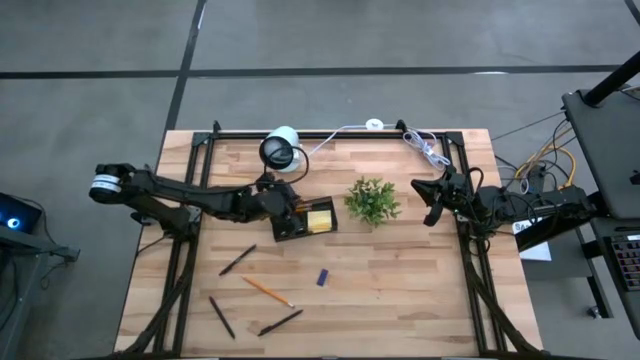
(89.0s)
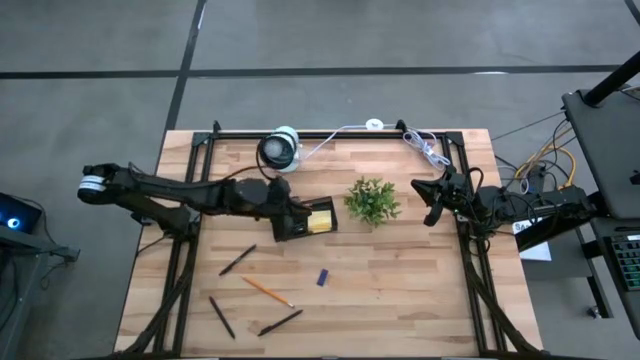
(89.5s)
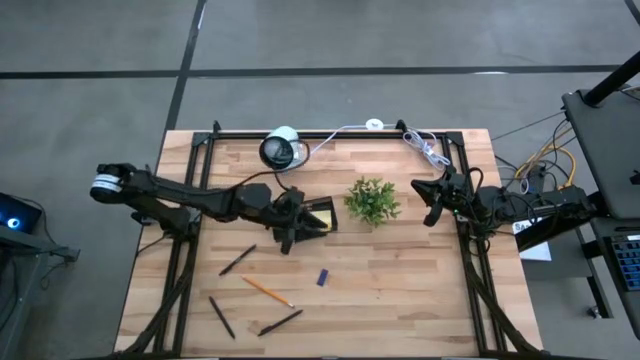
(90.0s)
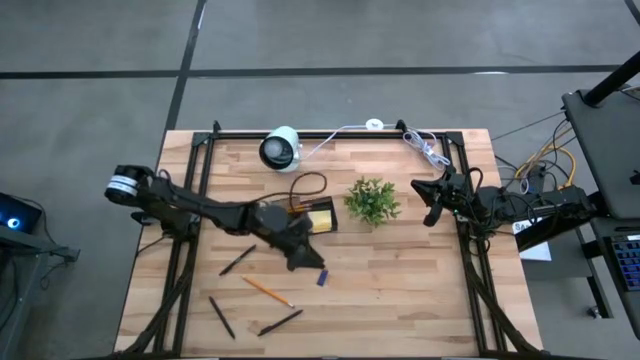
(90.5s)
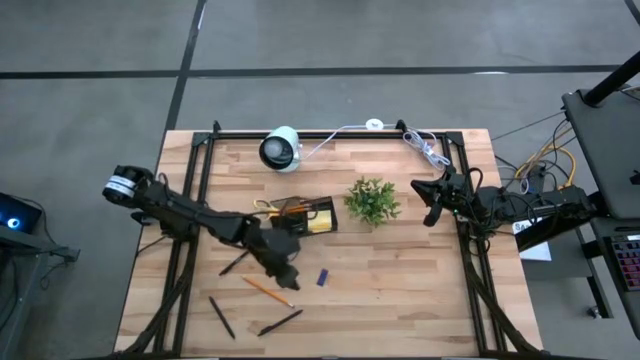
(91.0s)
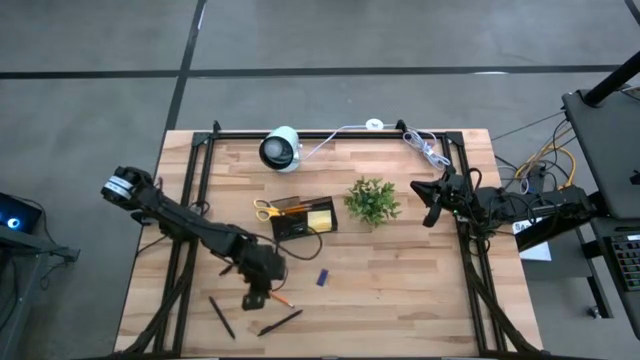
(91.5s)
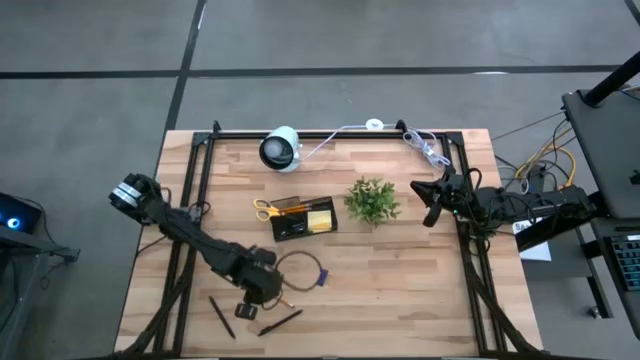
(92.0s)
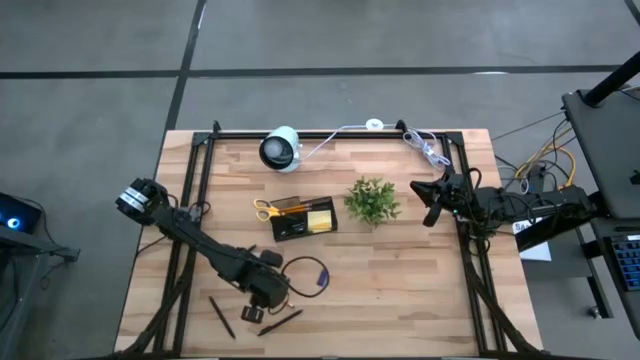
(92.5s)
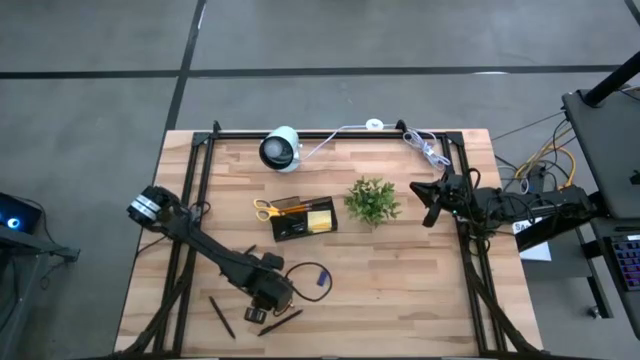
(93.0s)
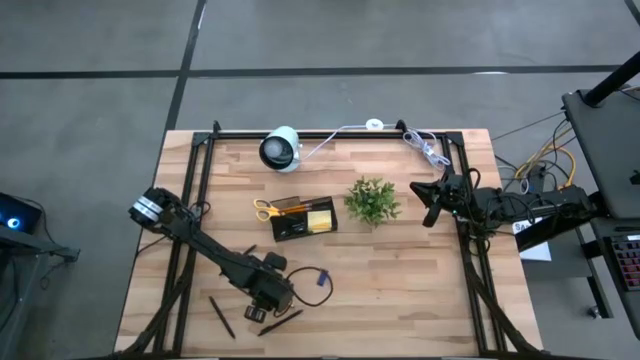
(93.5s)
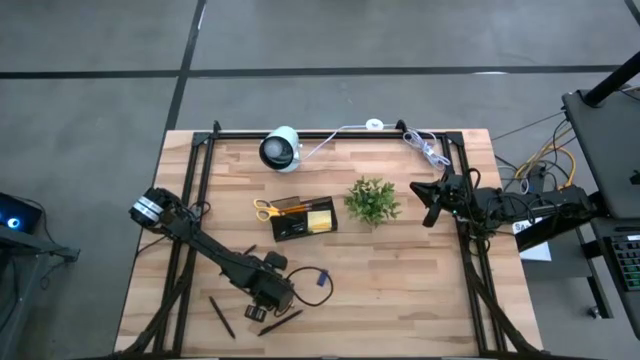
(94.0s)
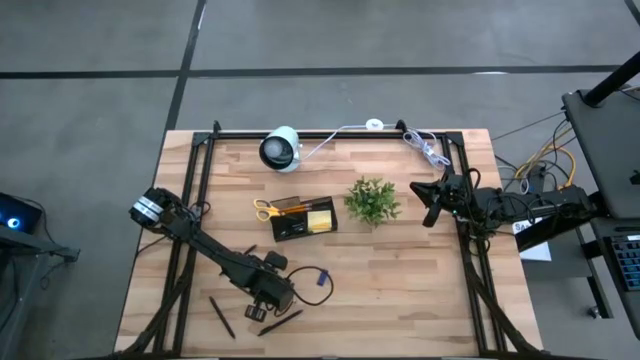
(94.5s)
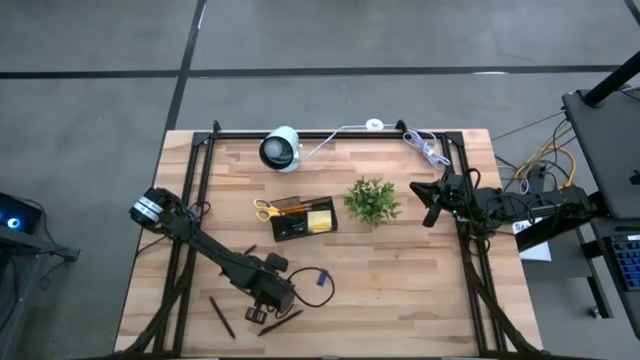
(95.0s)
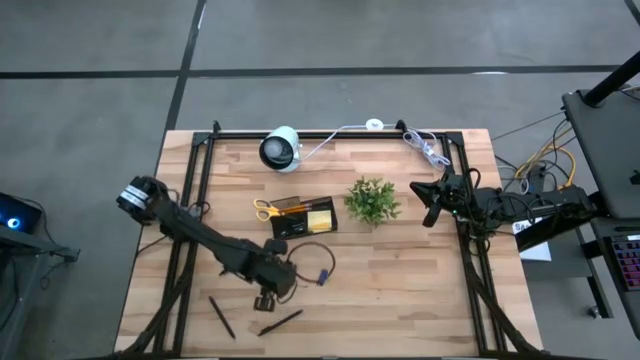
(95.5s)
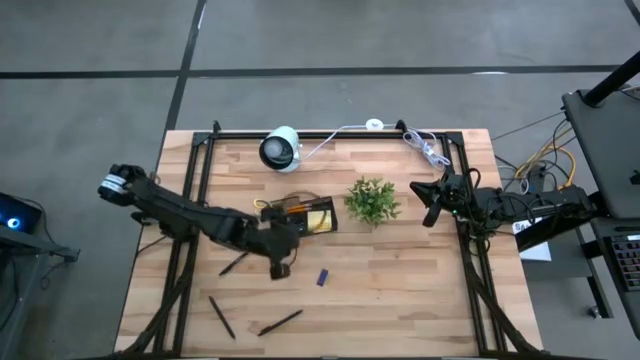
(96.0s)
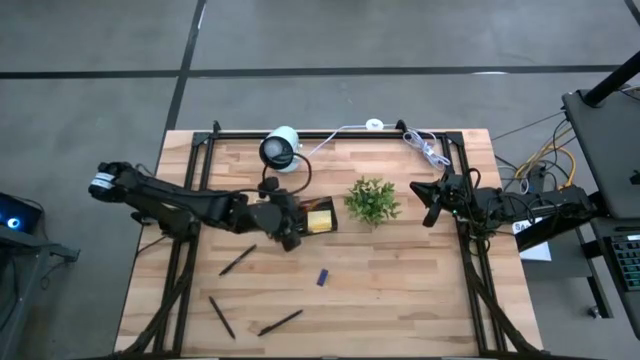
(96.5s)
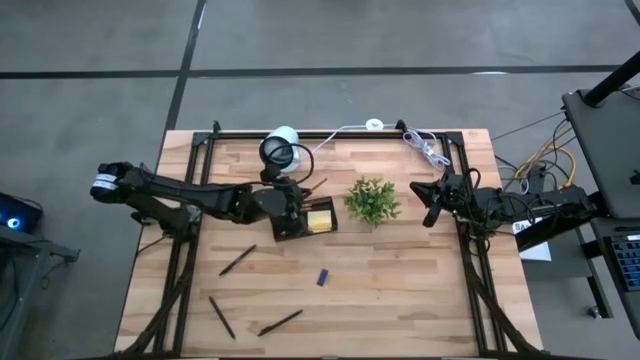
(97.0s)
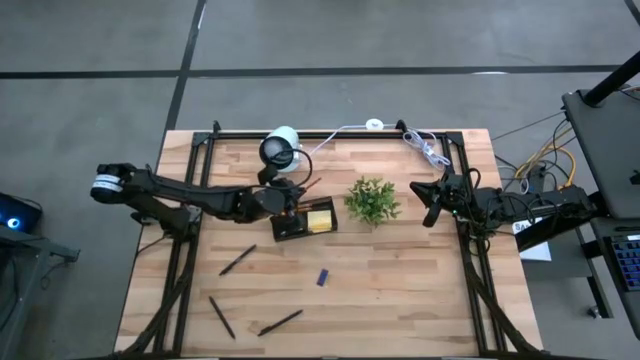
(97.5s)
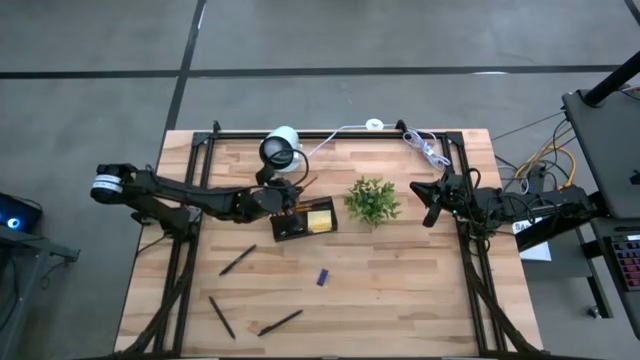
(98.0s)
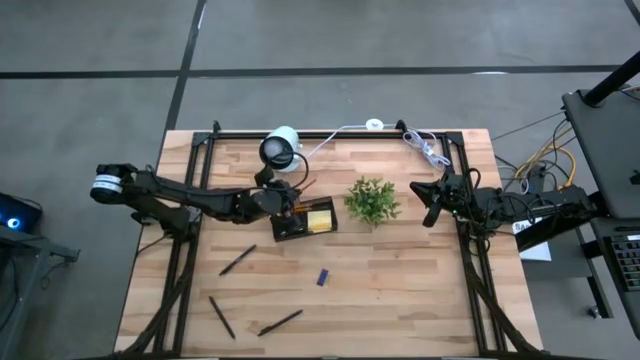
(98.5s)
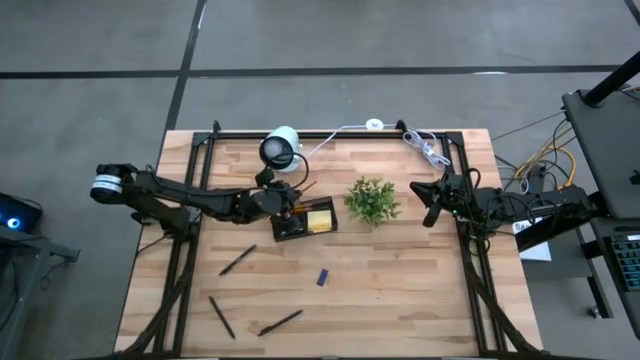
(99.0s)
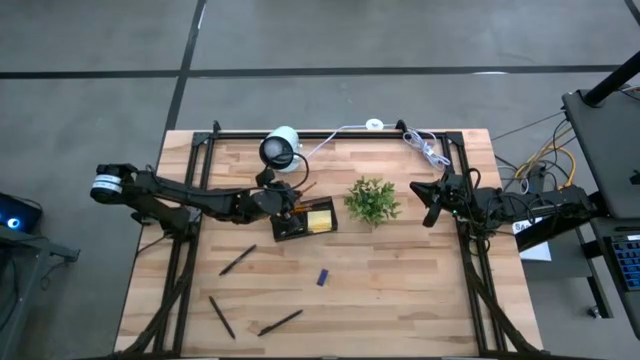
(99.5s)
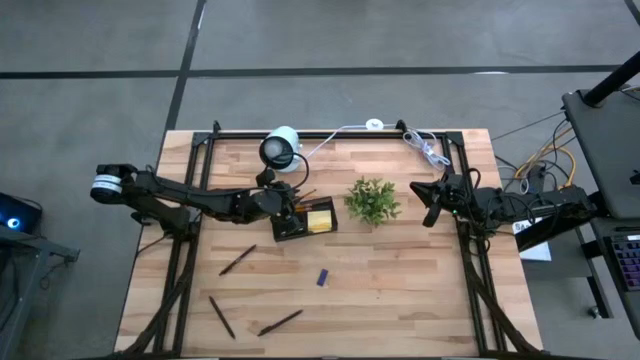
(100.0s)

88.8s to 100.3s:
Task: Pick and place office supplies into organizer
Put the yellow pencil in the black desk organizer

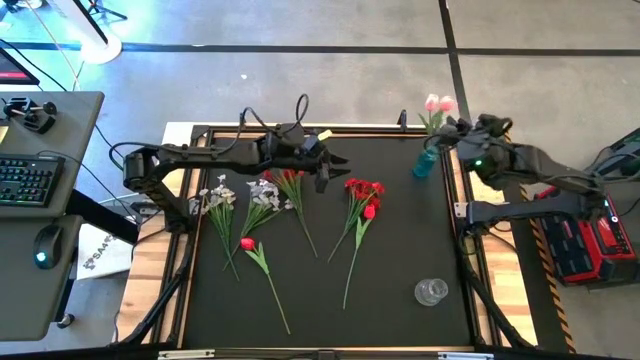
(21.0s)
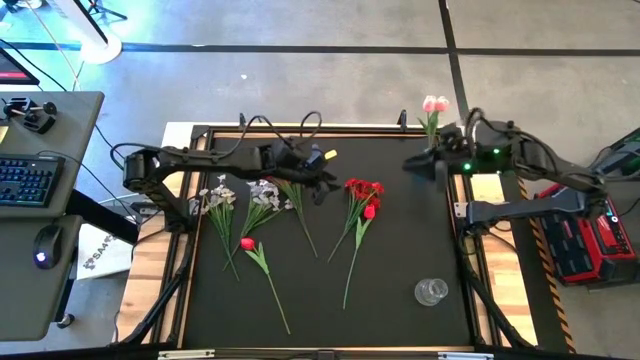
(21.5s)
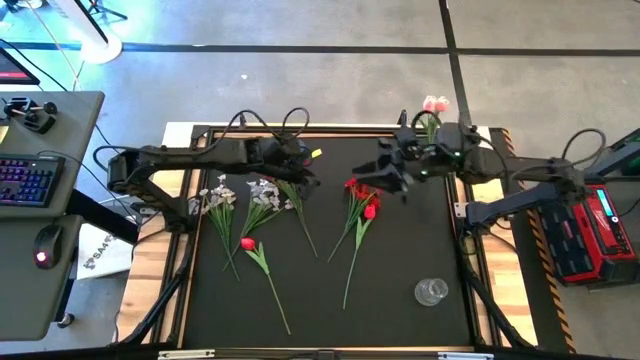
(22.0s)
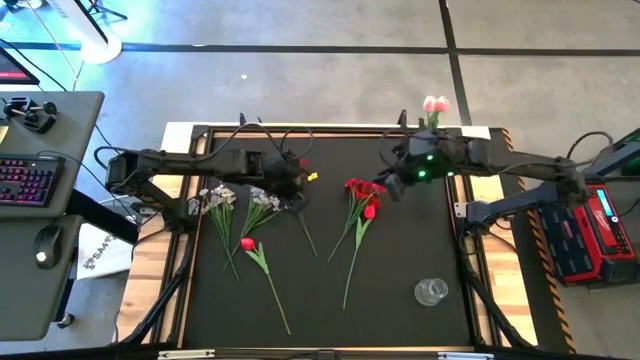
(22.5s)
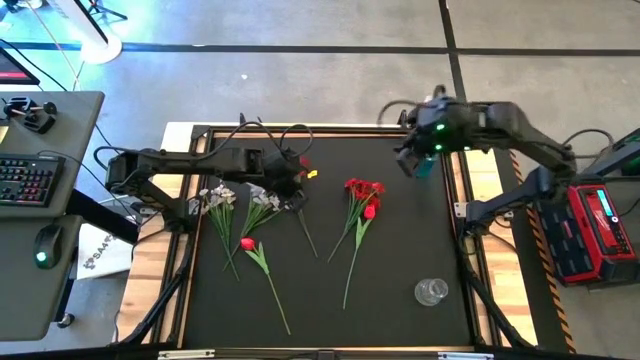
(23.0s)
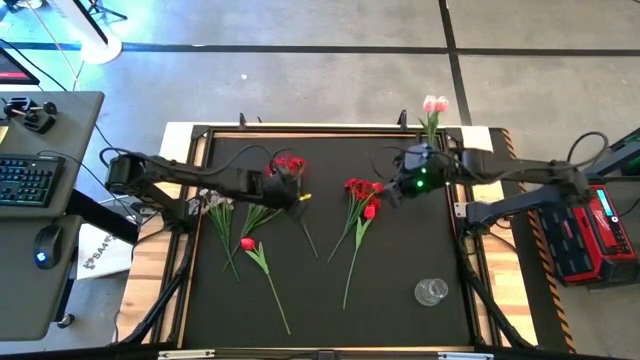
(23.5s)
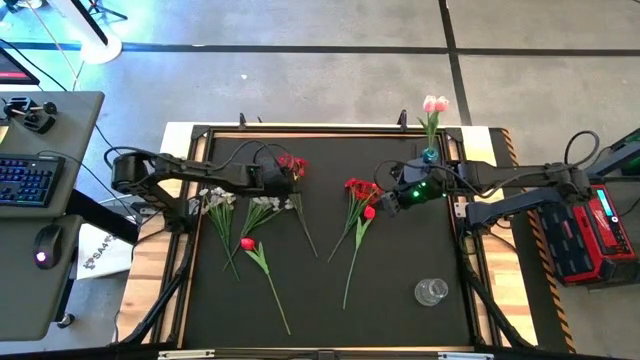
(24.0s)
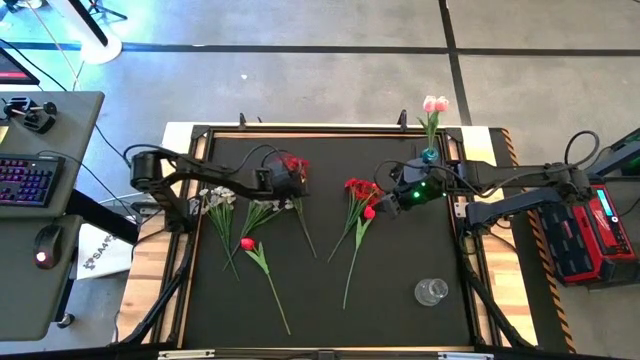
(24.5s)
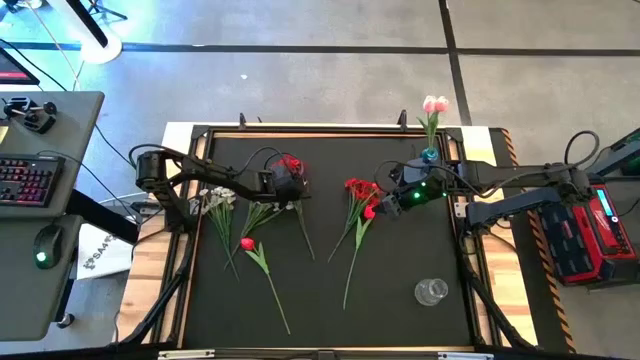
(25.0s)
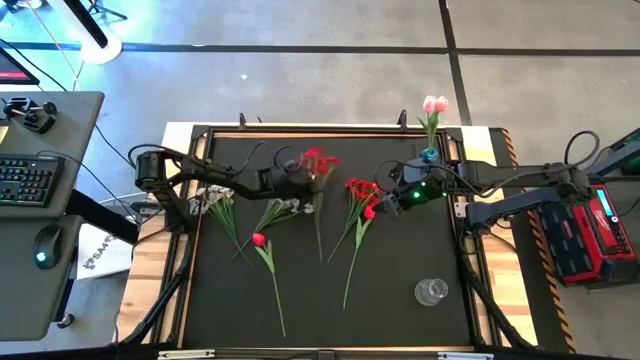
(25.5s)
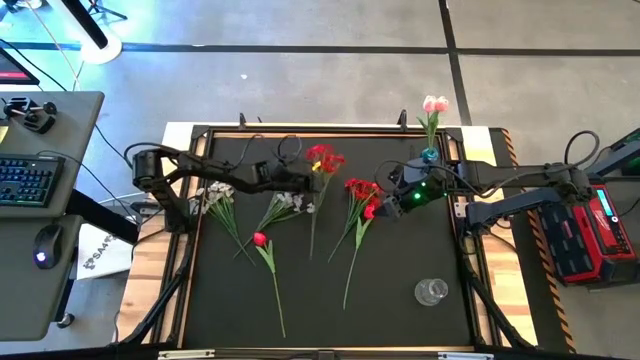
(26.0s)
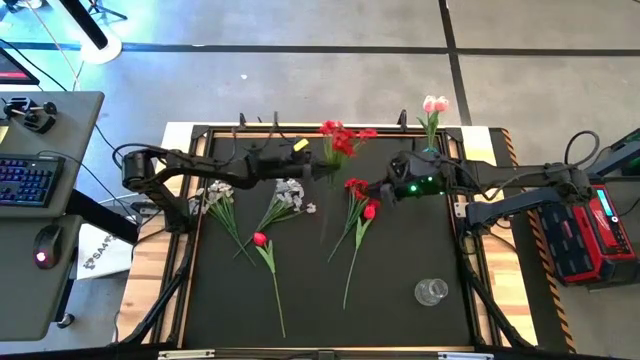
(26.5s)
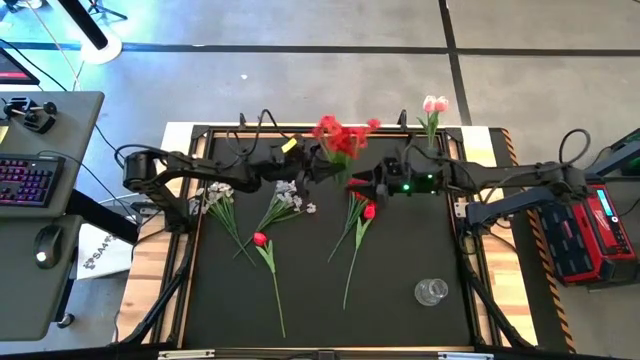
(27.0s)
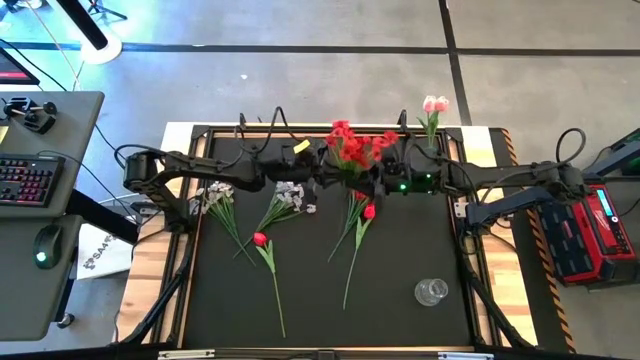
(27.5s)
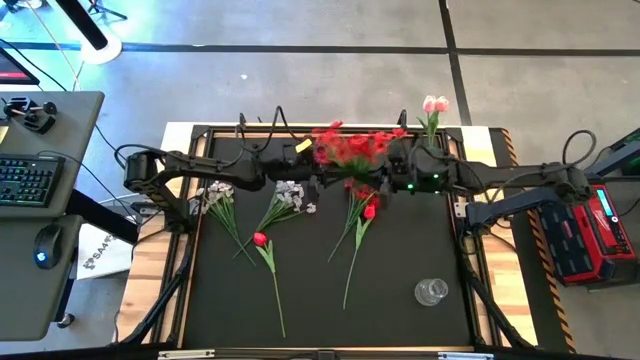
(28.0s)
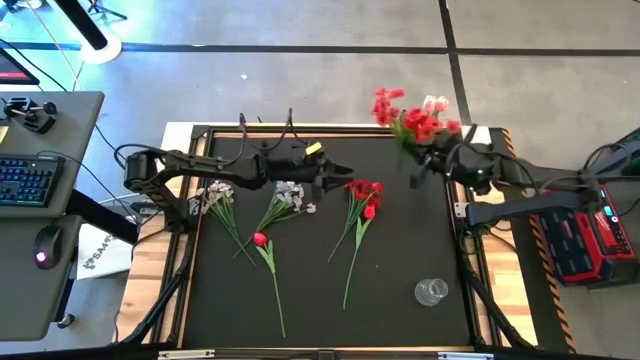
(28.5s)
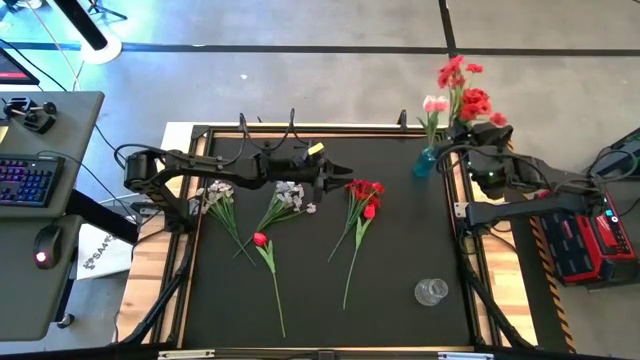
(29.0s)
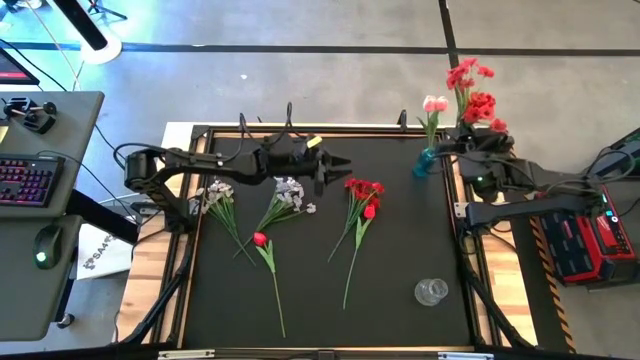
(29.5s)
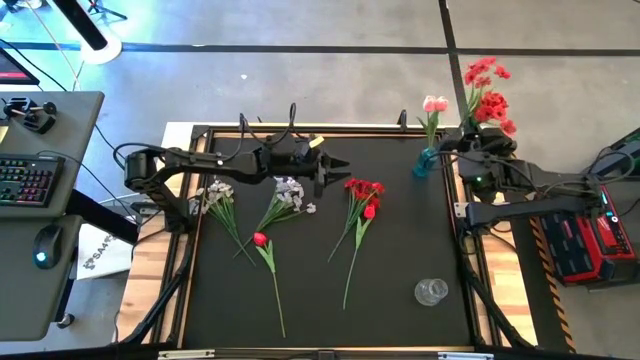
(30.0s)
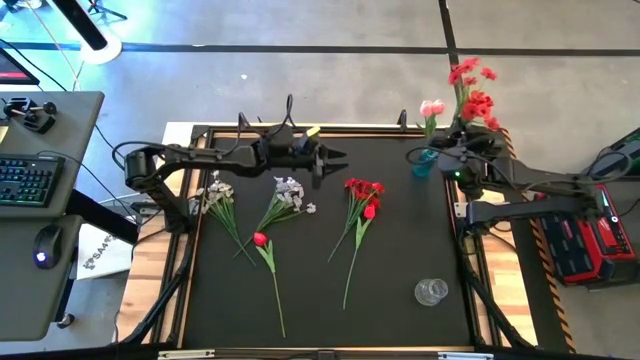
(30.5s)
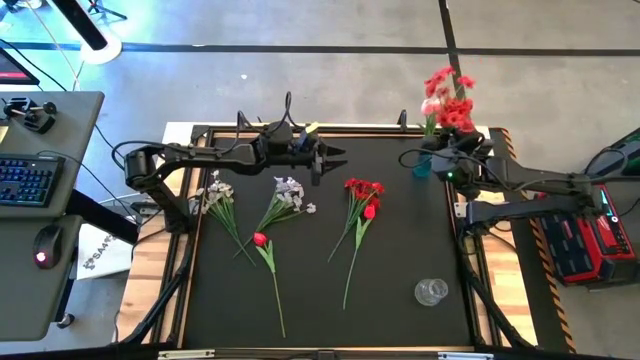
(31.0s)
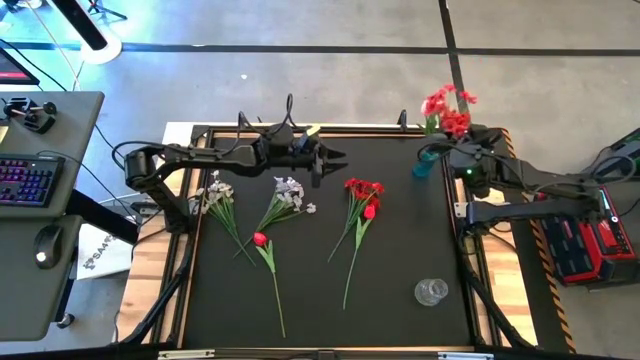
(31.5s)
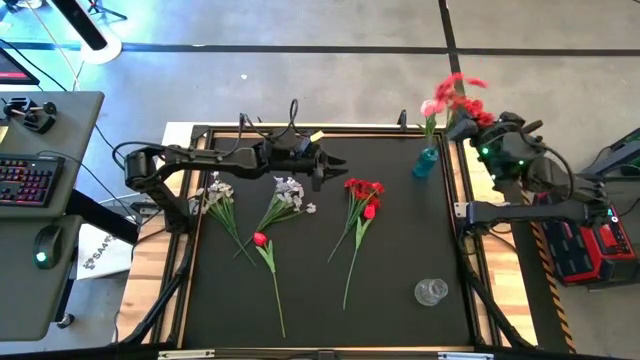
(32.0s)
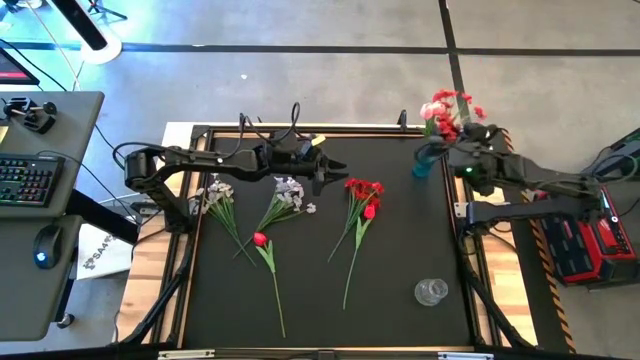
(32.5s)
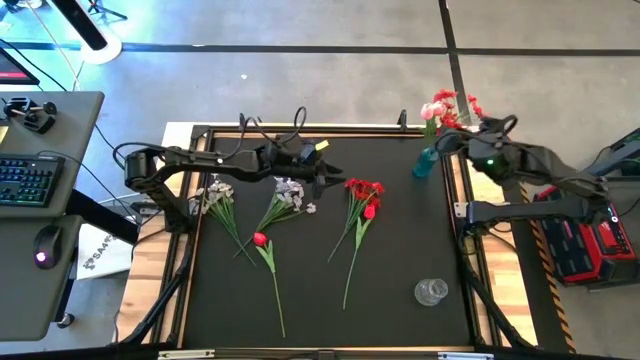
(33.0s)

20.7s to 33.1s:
Task: Sort flowers into vase by color
Put the left red flowers into the blue vase
